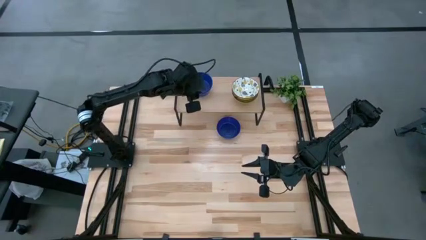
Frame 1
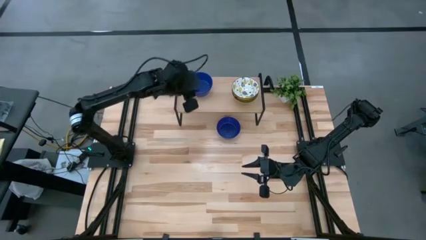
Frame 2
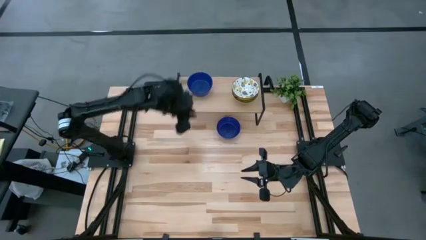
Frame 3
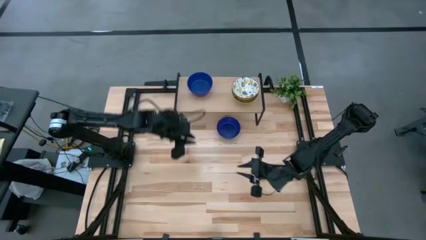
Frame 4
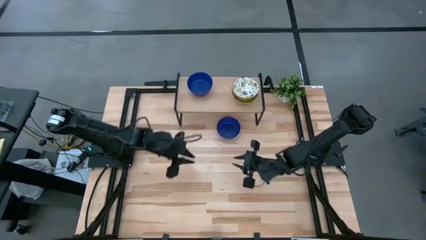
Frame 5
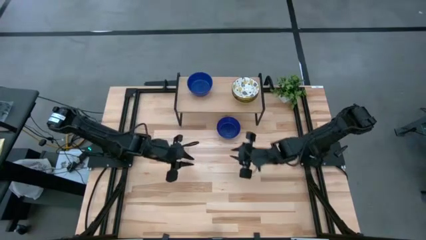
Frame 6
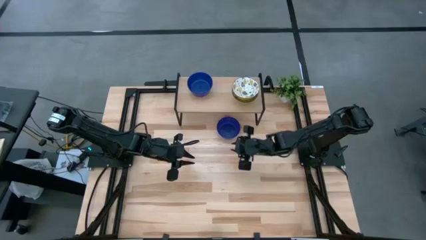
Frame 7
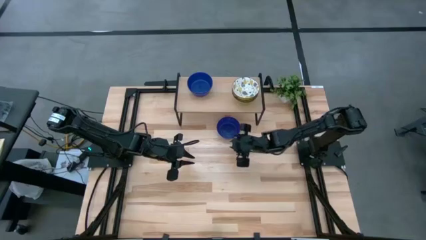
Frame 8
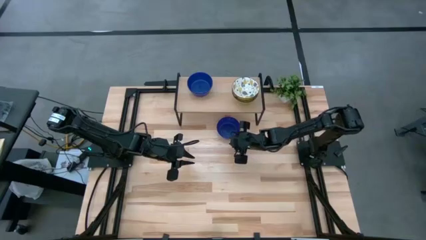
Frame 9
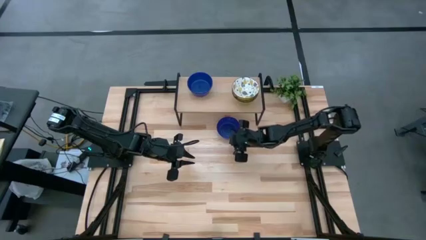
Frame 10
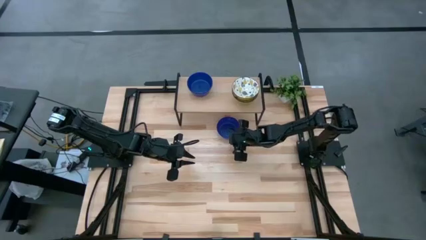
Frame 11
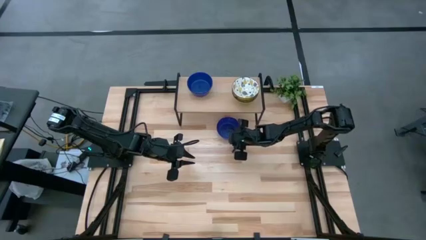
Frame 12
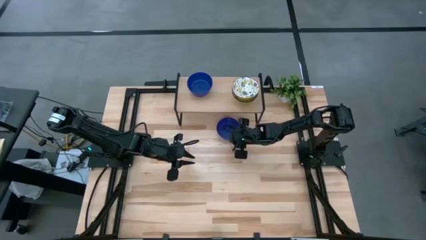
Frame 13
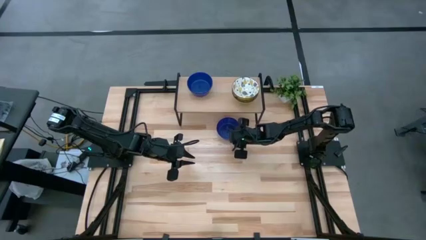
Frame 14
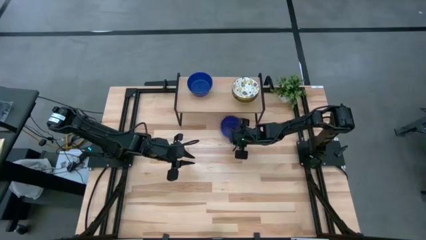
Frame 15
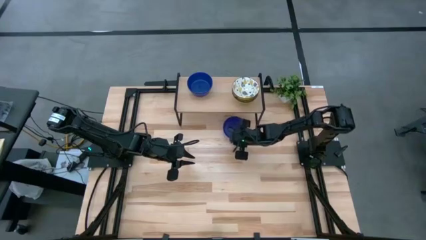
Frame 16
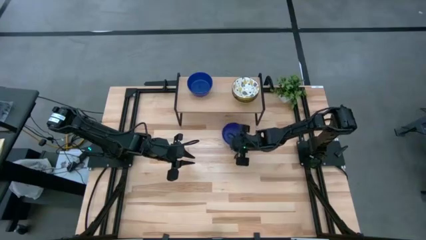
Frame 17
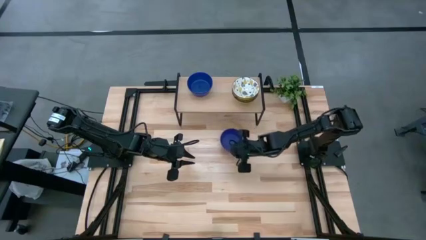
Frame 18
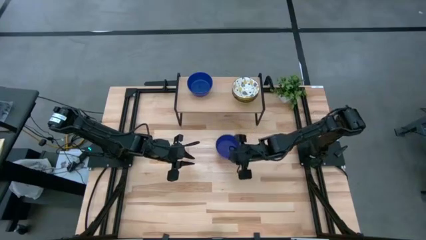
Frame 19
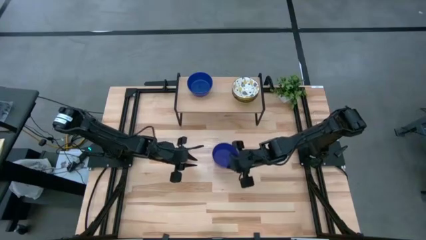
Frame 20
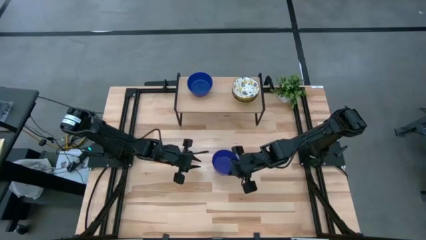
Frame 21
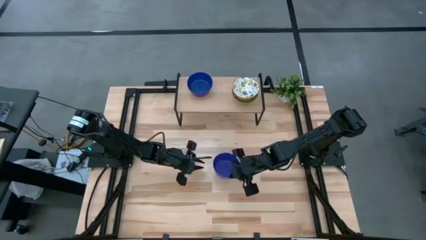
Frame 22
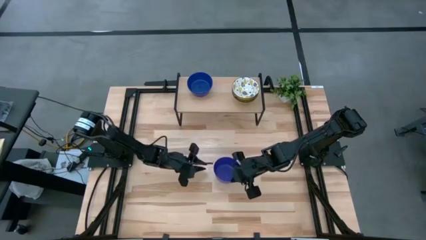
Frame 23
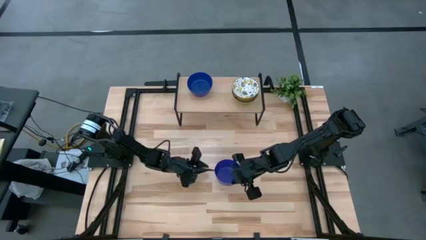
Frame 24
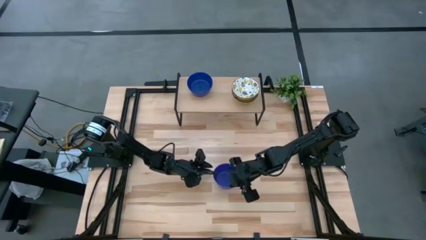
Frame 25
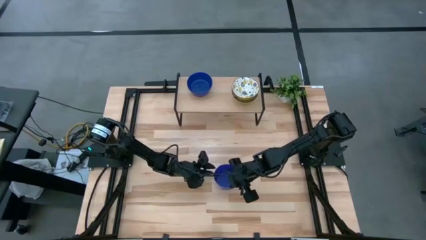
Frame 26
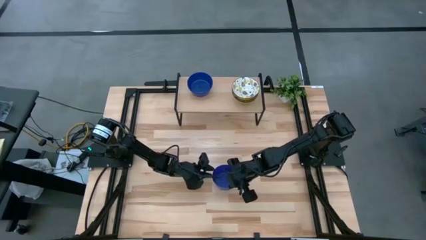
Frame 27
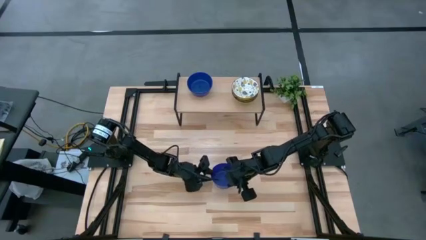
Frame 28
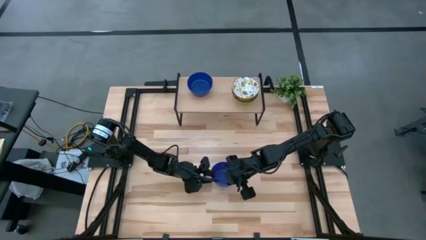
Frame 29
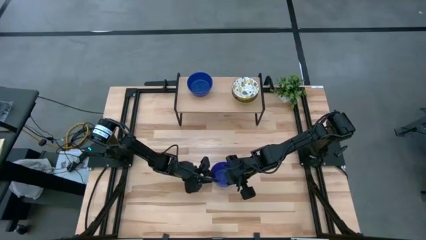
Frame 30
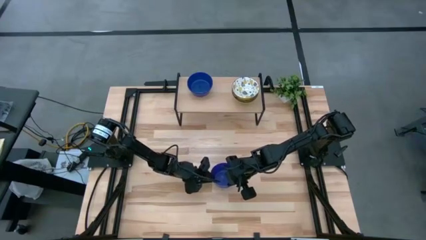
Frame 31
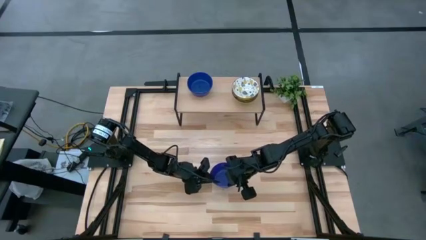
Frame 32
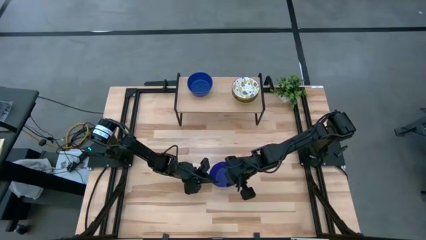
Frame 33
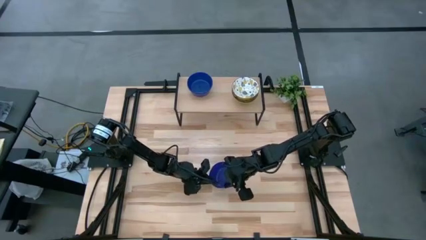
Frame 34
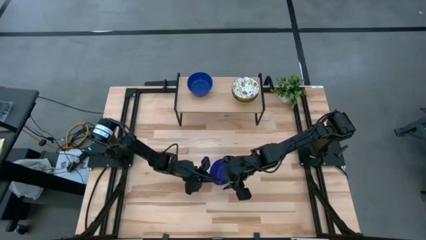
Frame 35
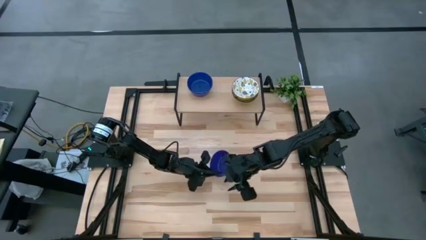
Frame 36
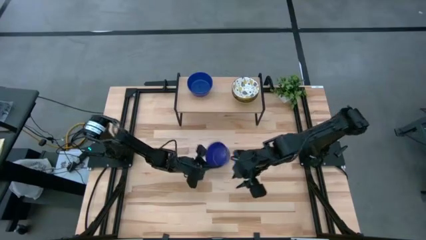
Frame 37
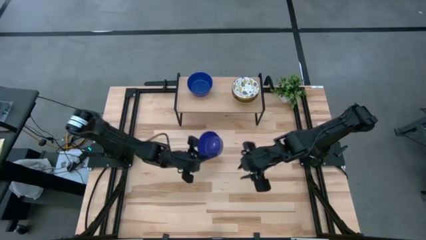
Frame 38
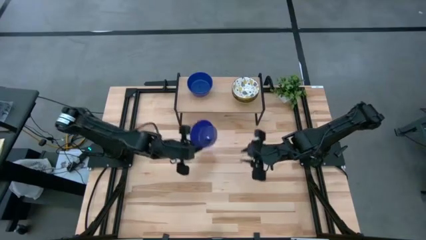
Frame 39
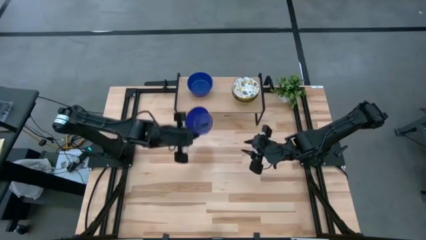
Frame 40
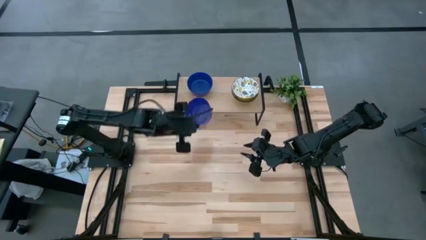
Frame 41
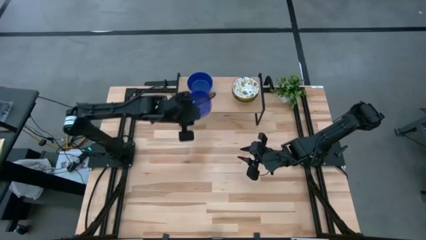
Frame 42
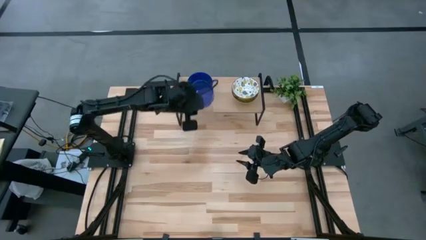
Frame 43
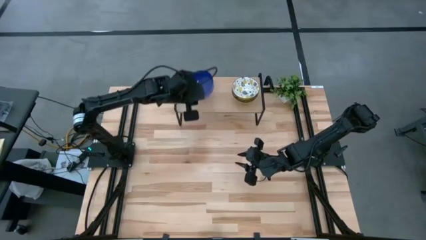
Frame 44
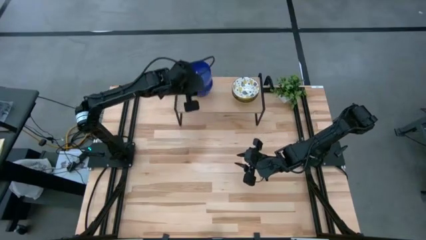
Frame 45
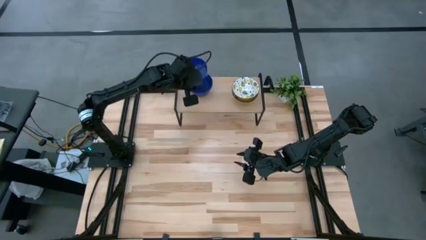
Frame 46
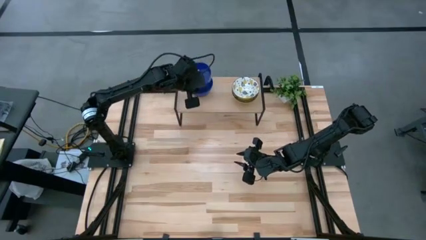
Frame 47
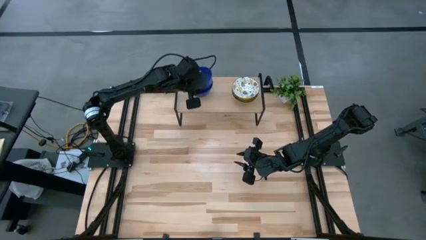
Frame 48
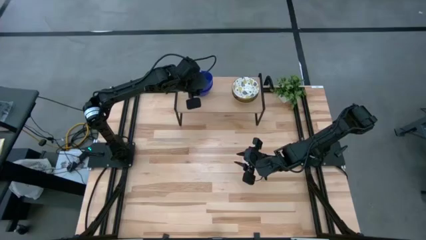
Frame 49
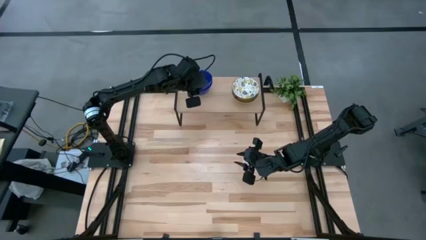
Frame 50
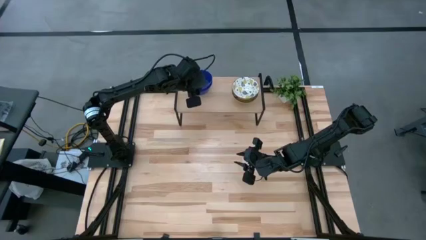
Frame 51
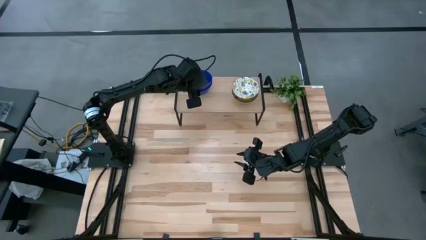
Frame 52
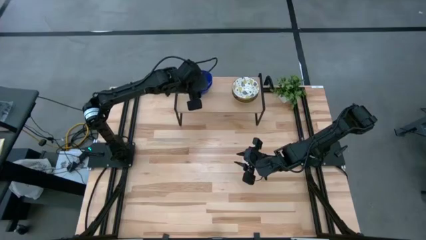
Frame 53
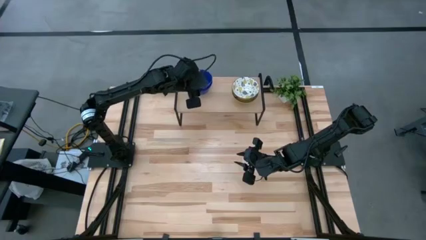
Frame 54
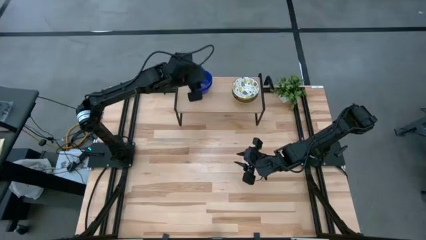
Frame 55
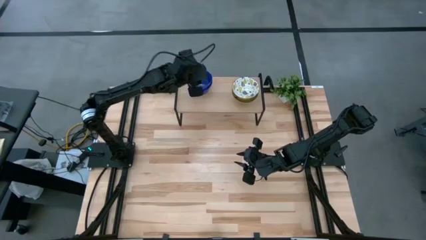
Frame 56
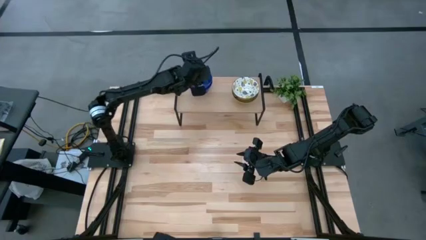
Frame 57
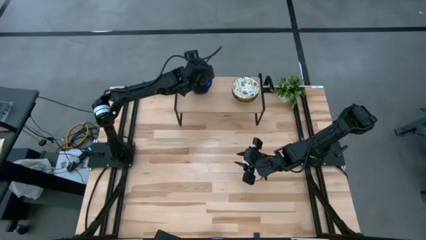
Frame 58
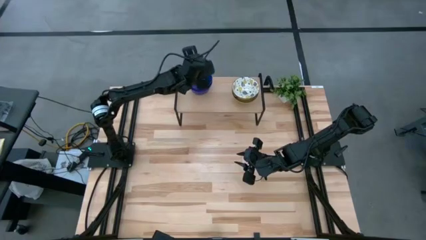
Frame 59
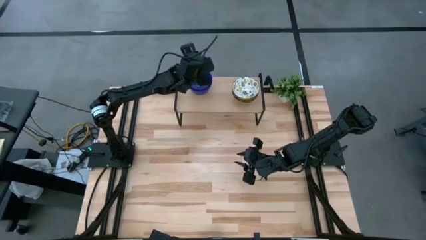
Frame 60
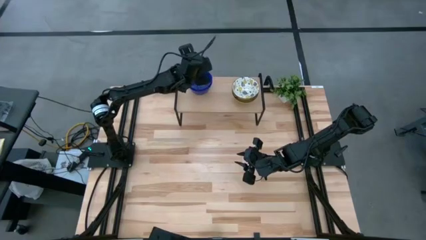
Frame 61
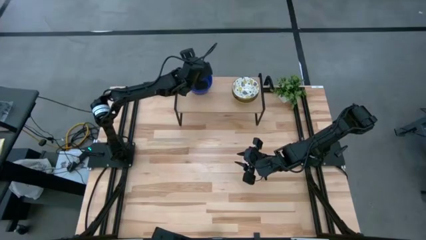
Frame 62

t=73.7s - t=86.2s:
Task: Pick & Place Mini bowls
Stack the blue bowl on the blue bowl on the shelf

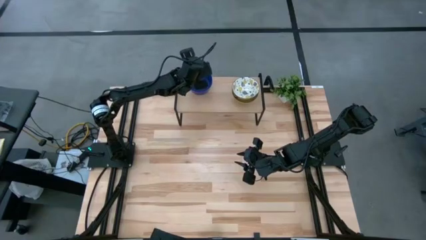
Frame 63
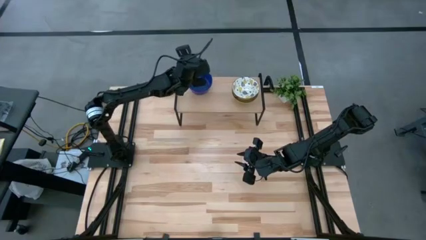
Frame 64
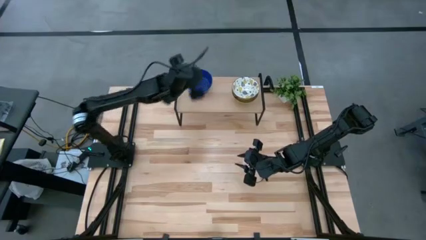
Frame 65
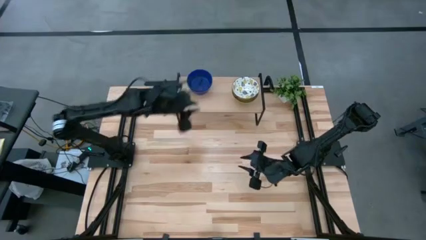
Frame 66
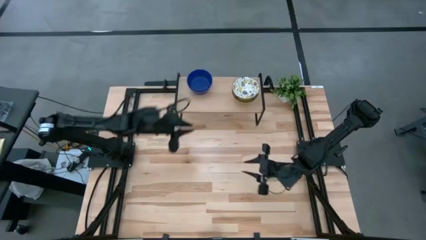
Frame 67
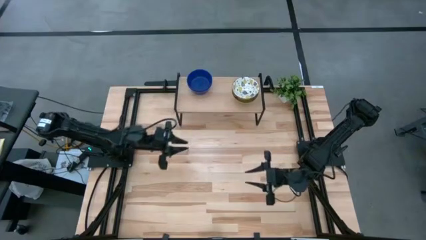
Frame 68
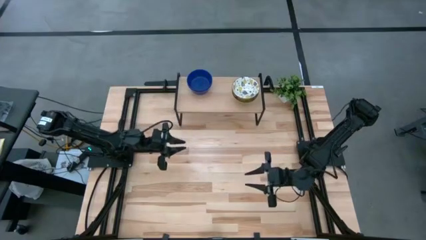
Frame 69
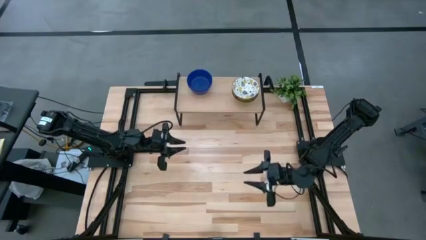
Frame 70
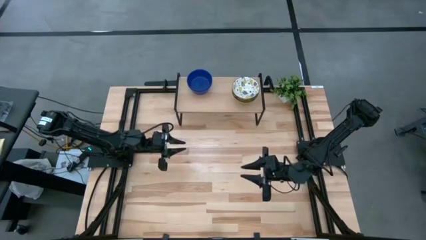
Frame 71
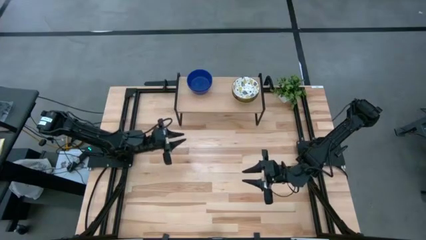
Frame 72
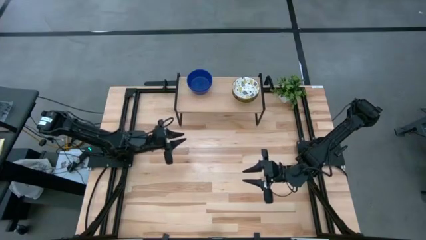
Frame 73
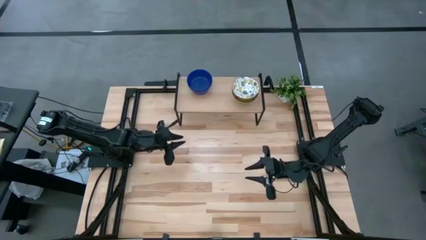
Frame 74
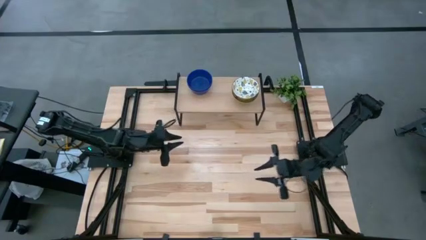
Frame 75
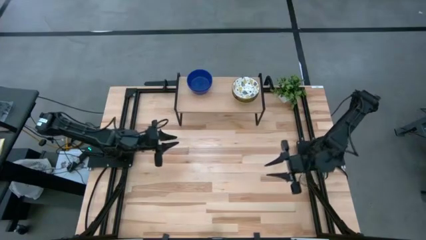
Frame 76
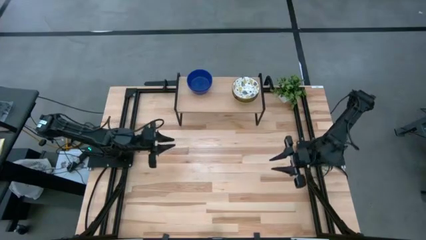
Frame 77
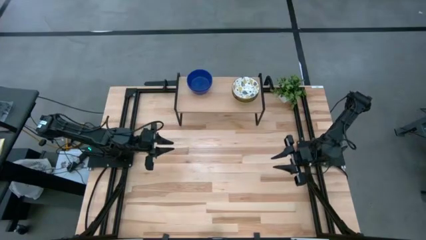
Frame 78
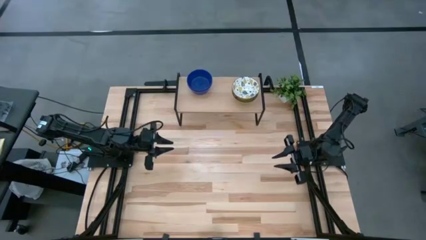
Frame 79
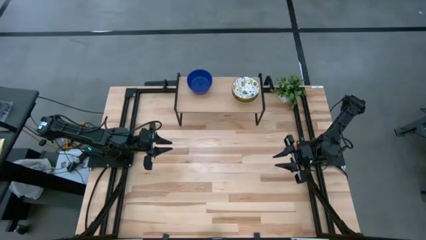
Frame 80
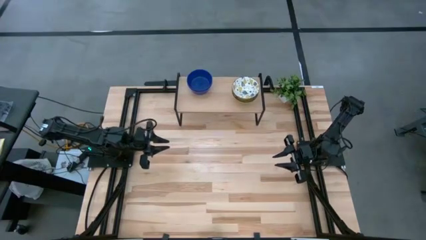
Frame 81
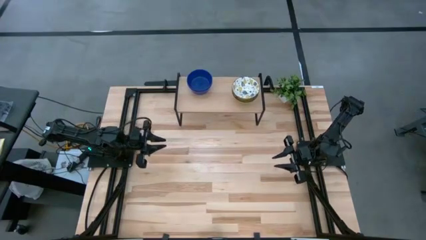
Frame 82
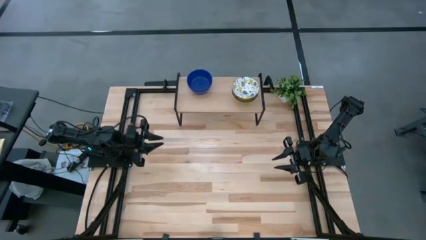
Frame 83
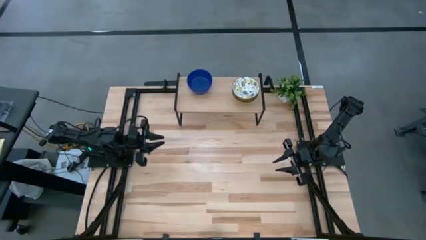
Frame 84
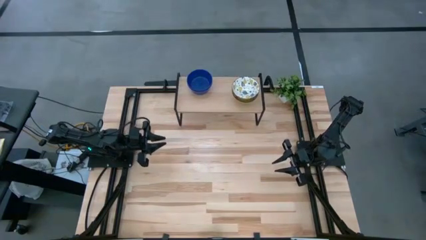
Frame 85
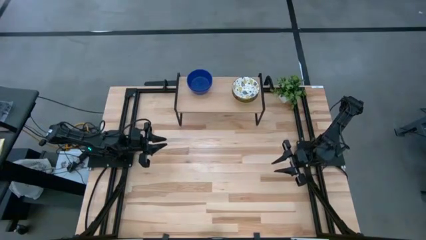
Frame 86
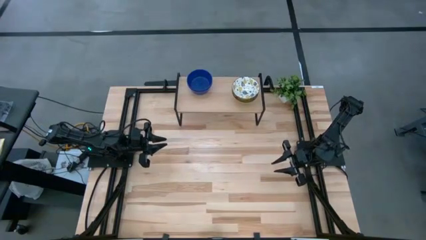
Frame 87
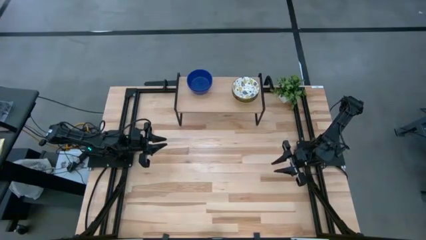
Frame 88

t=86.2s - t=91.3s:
Return to Home Position
